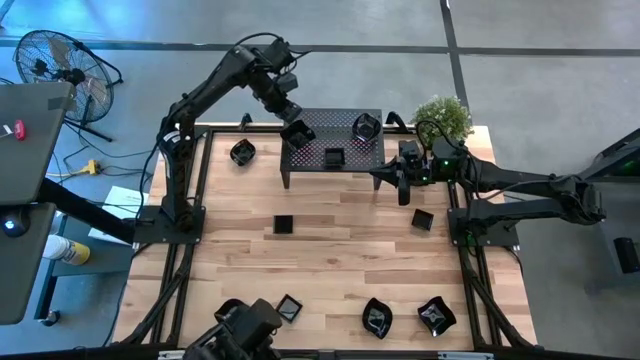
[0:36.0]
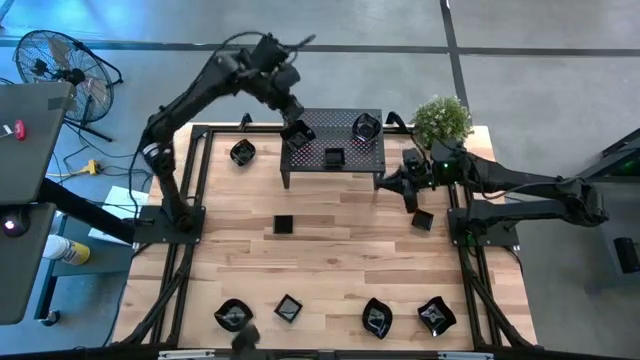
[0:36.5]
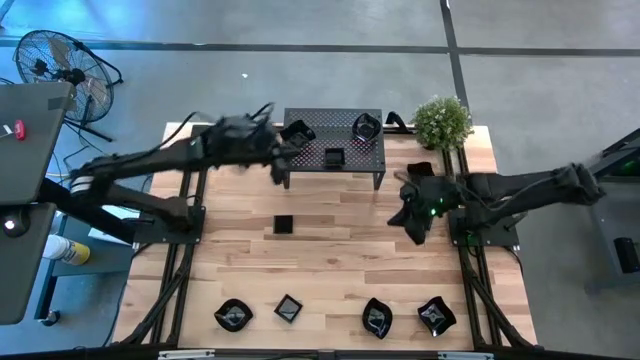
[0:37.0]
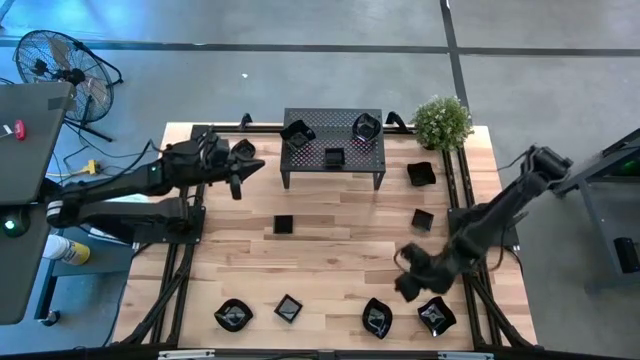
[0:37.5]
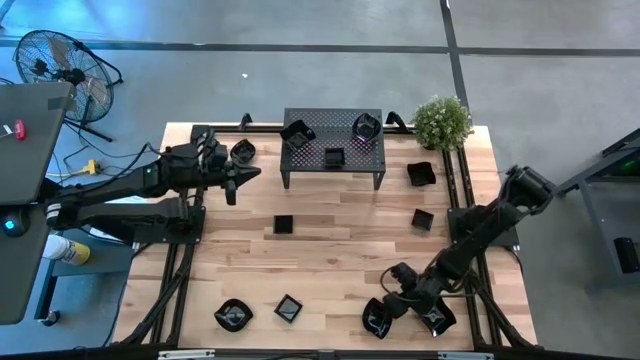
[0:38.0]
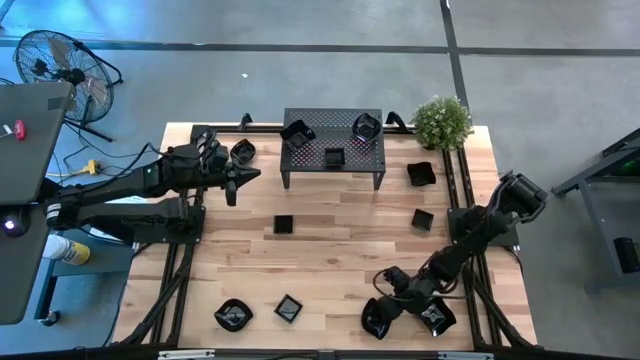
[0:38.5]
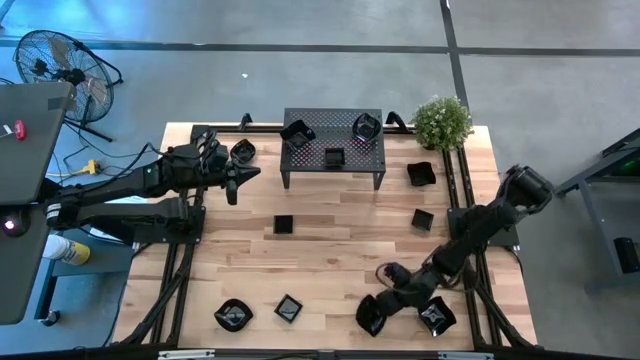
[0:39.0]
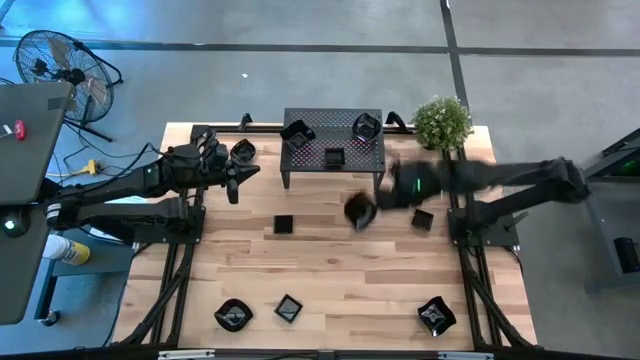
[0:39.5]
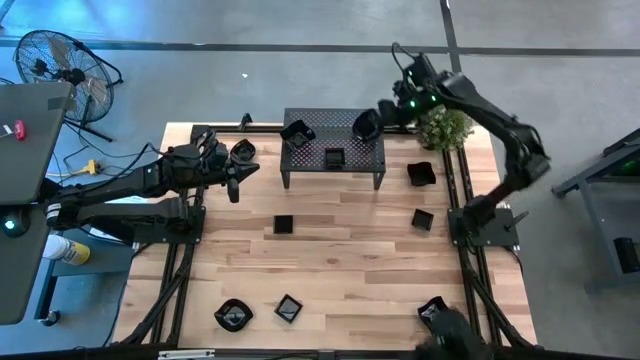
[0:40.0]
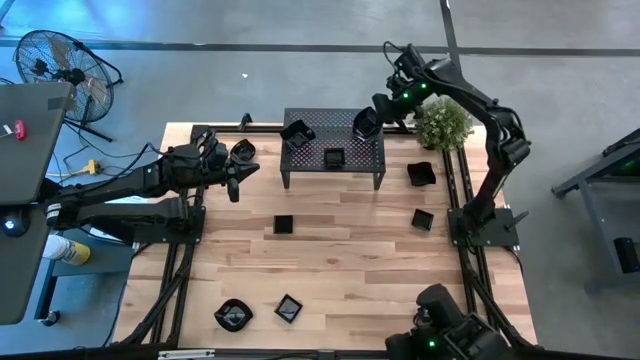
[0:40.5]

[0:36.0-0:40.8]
Task: Pick & Place Mini shaped plates
Stack the black leaf shaped plate on top of the black leaf shaped plate on the shelf

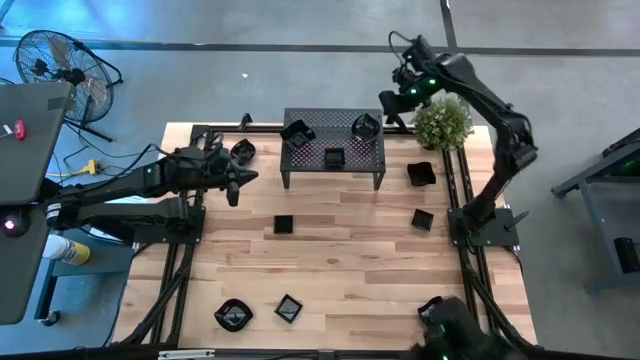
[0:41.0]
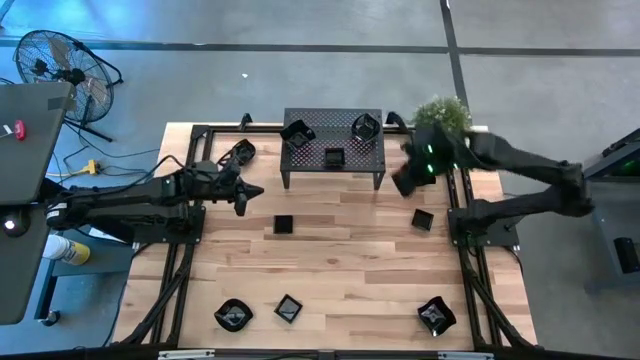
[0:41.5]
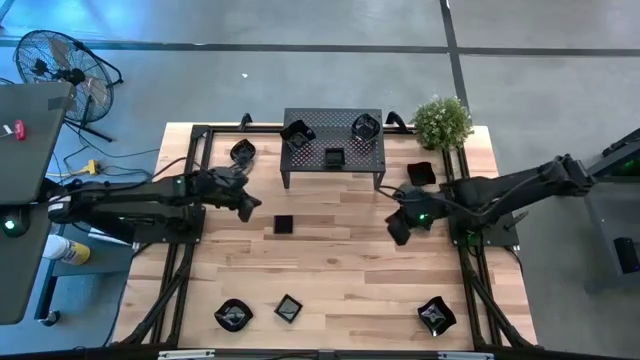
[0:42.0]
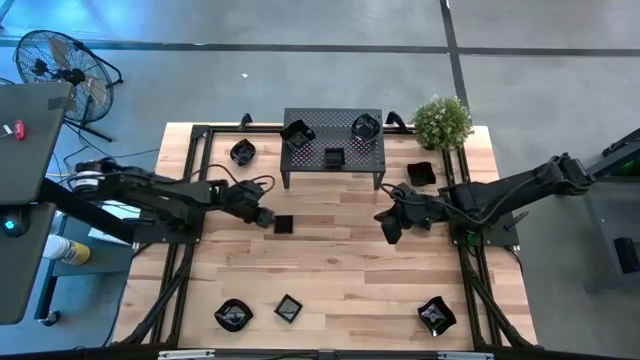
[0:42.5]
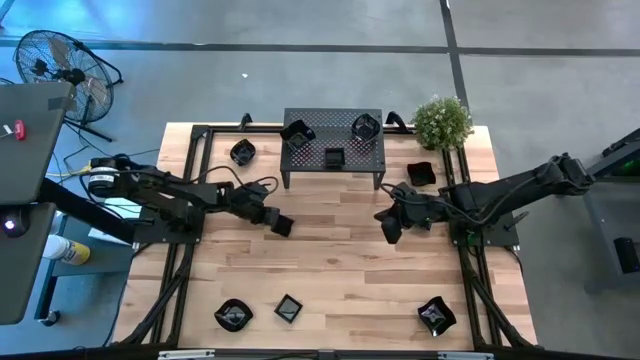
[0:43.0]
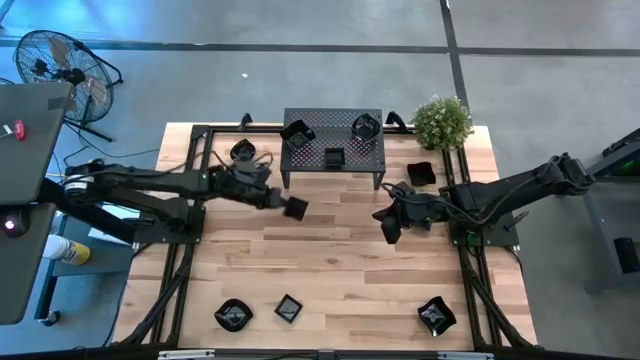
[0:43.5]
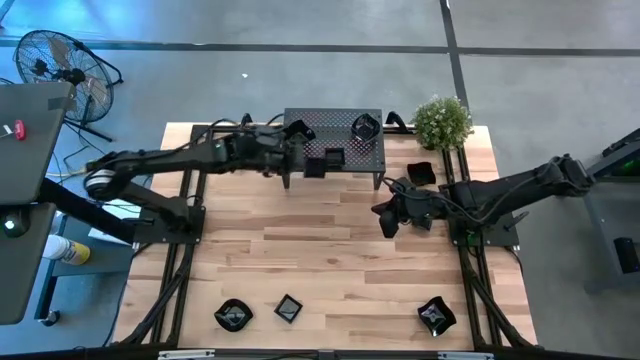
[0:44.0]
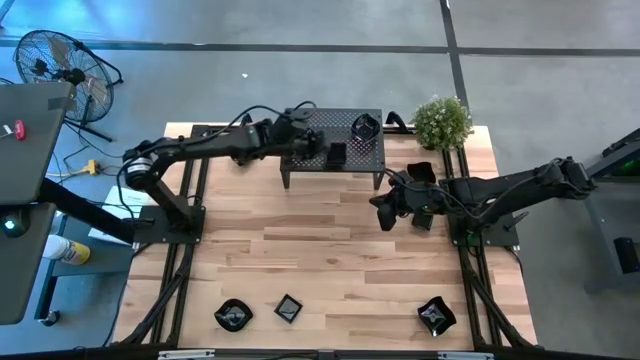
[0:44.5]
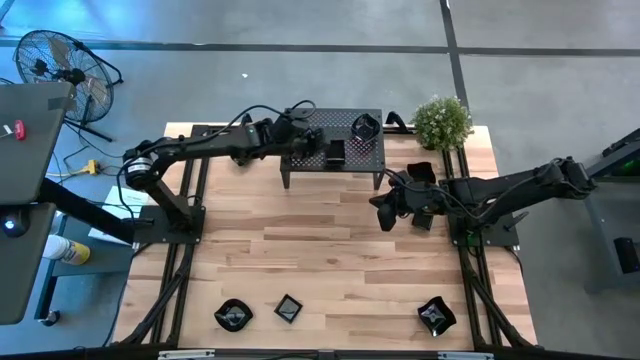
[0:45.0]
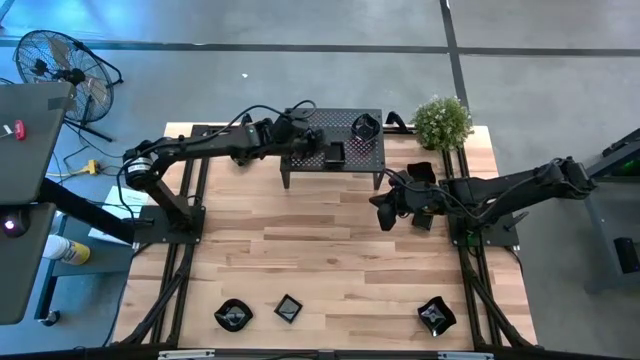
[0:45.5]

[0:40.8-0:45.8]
Stack the black square plate on top of the black square plate on the shelf

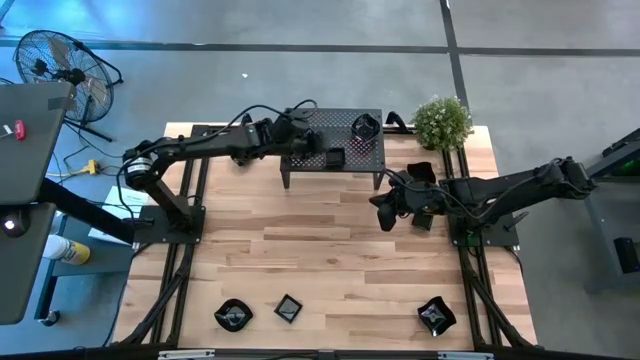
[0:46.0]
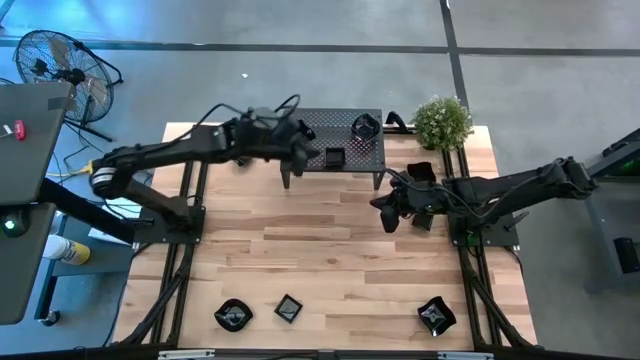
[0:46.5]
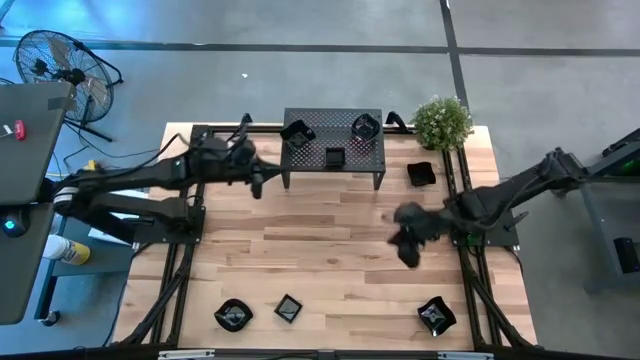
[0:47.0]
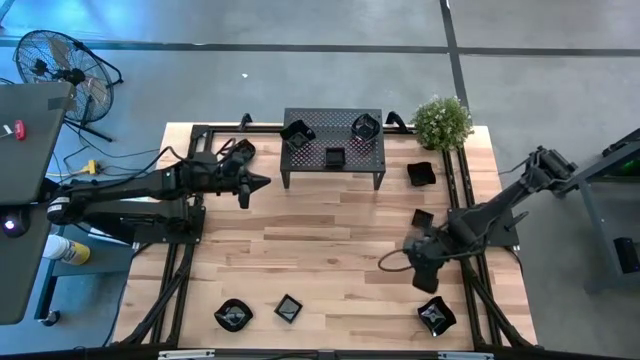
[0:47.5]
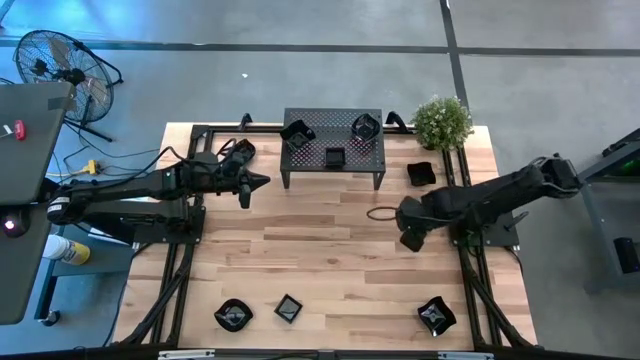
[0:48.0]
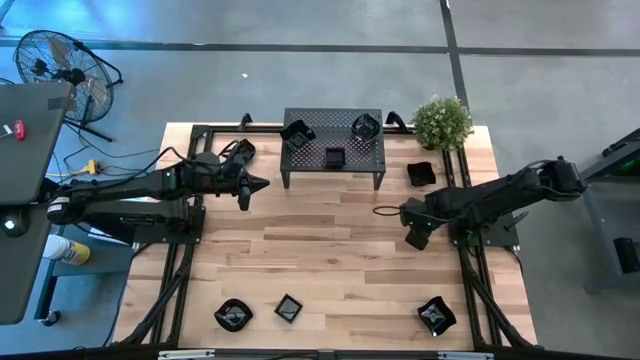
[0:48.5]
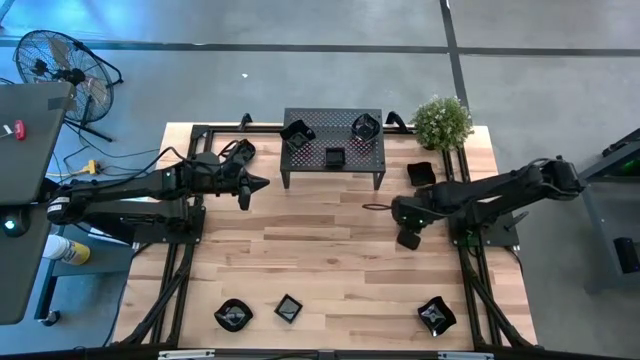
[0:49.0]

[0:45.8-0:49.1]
Stack the black square plate on top of the black square plate on the shelf

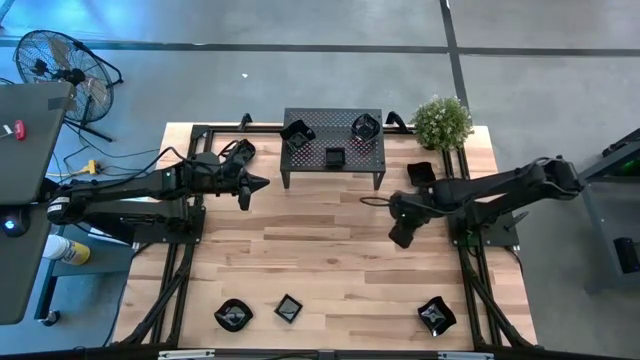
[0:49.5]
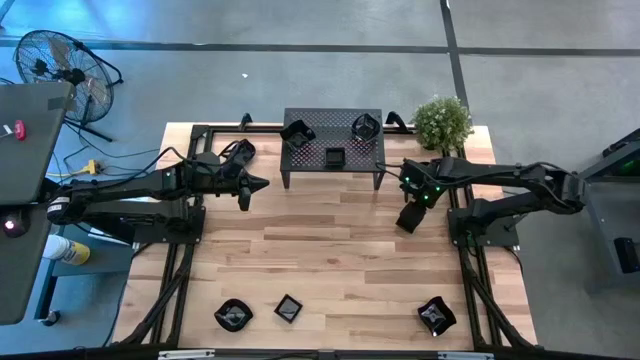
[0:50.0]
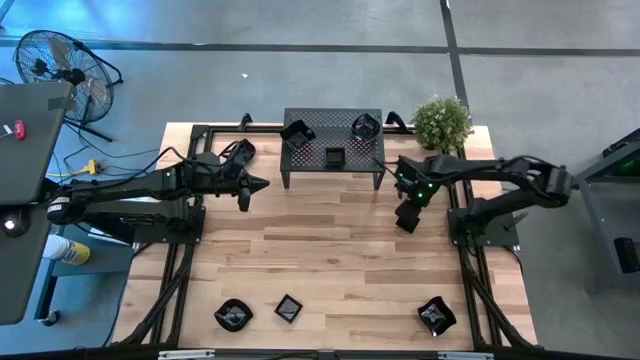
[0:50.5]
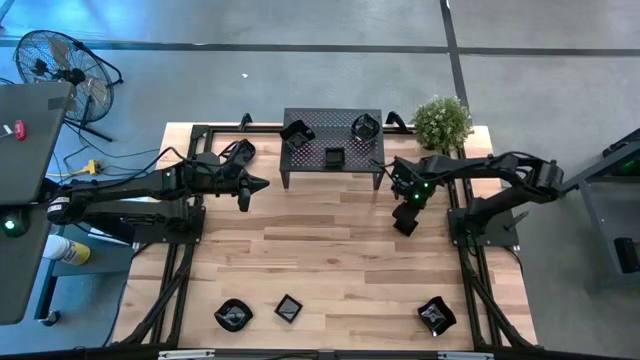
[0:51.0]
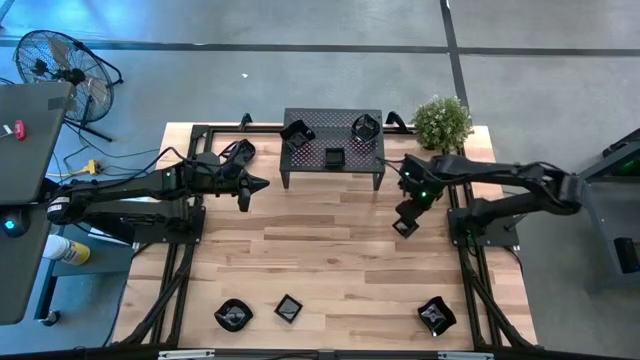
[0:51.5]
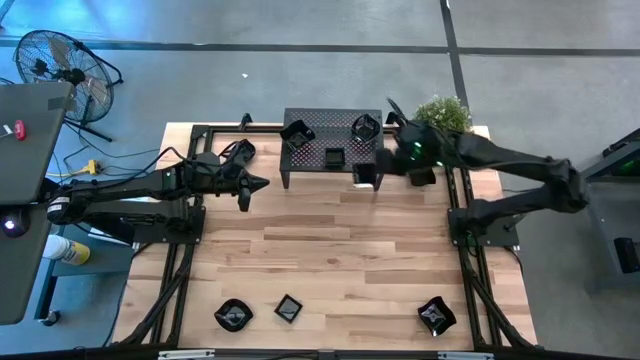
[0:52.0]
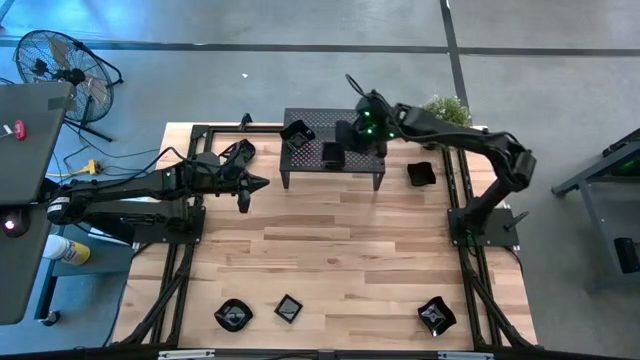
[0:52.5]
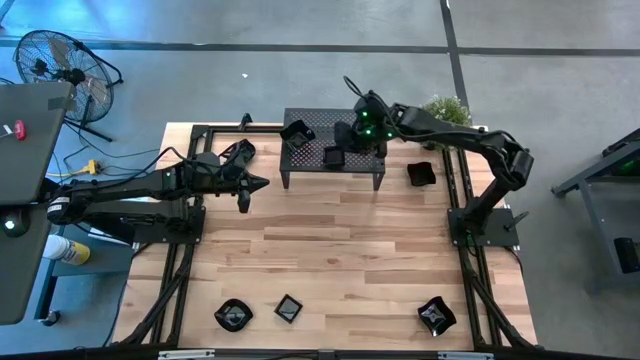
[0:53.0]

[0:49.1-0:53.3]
Stack the black square plate on top of the black square plate on the shelf

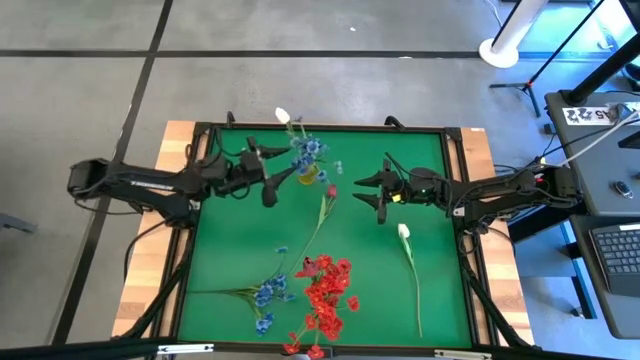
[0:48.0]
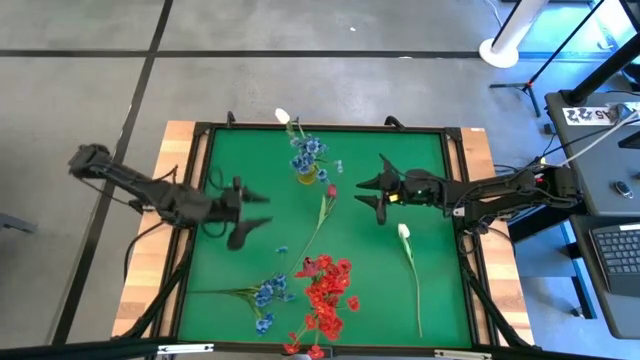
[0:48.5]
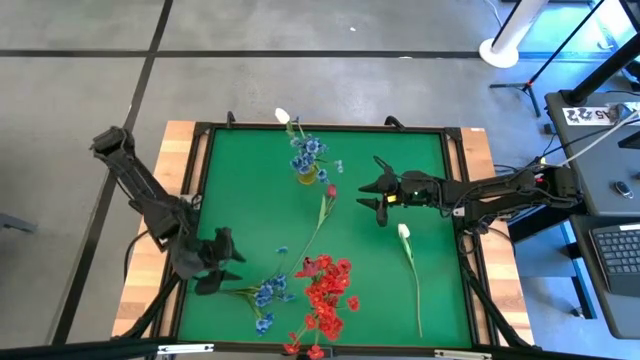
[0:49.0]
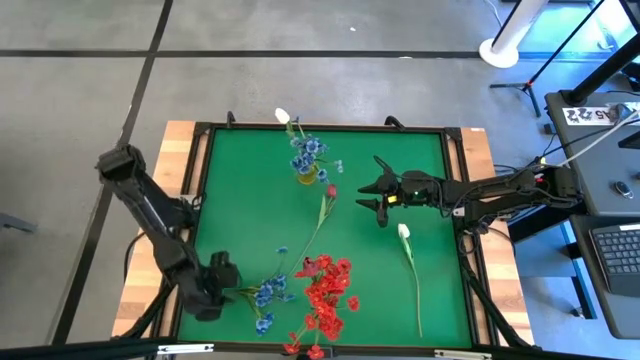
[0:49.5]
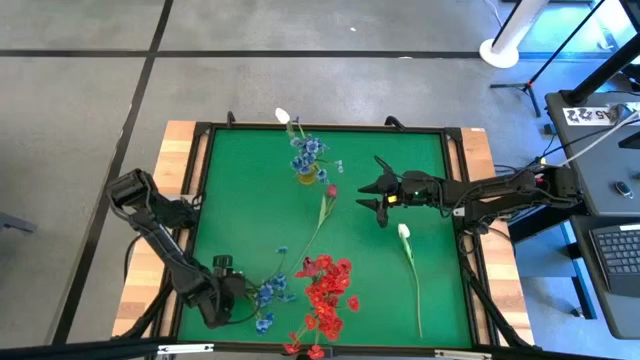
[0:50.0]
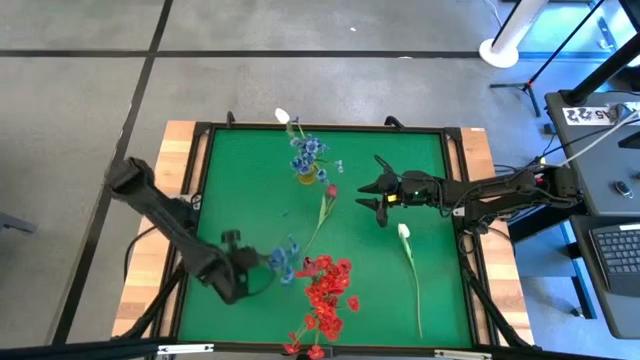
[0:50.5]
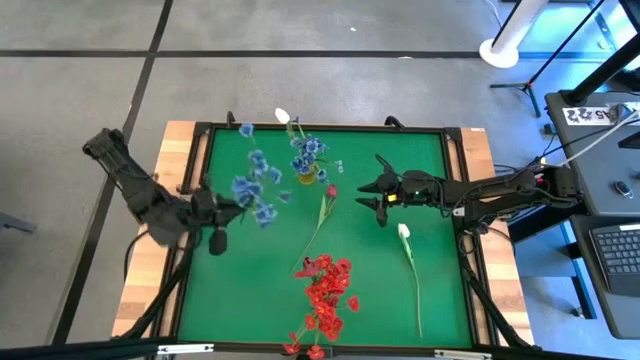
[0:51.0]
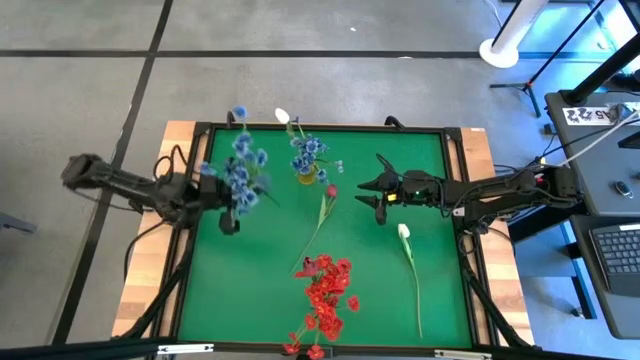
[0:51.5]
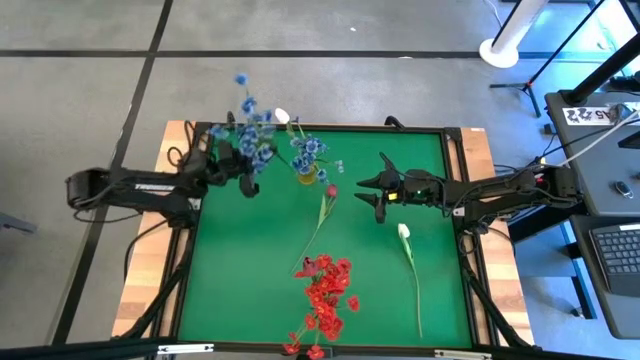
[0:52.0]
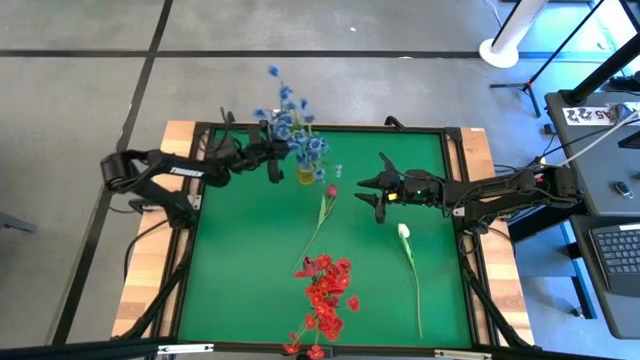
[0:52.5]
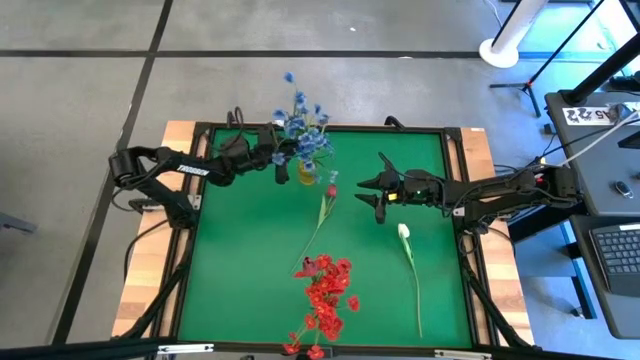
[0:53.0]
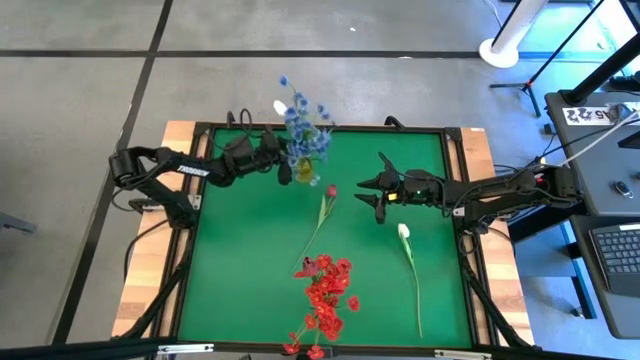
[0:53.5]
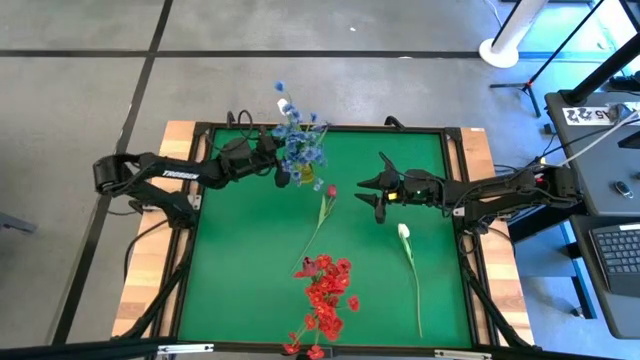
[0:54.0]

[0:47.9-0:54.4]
Task: Sort flowers into vase by color
Put the blue flower into the yellow vase
